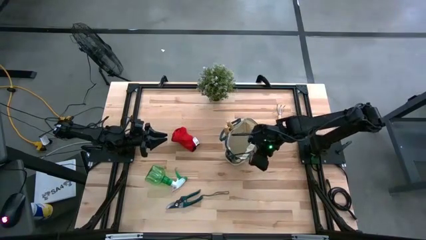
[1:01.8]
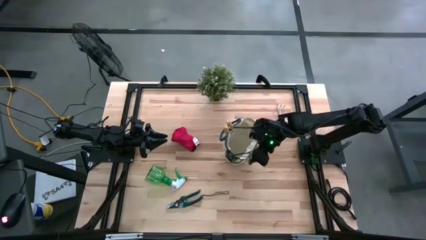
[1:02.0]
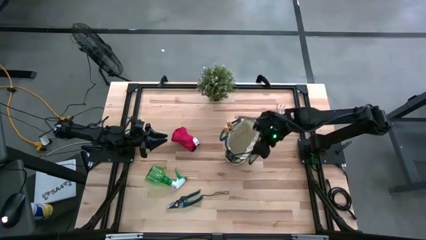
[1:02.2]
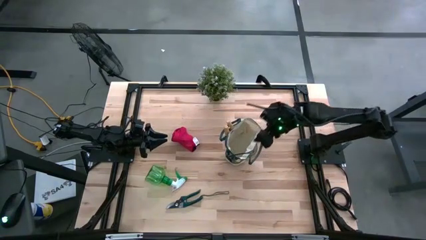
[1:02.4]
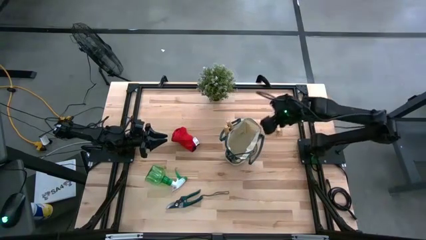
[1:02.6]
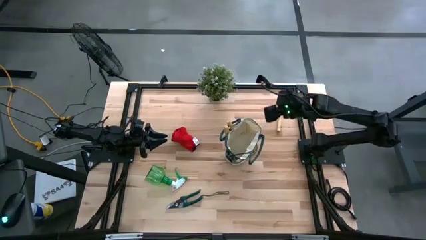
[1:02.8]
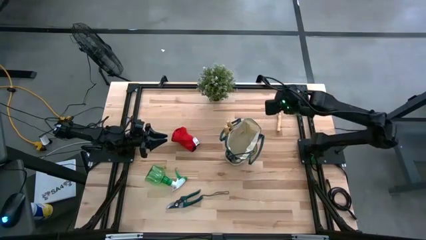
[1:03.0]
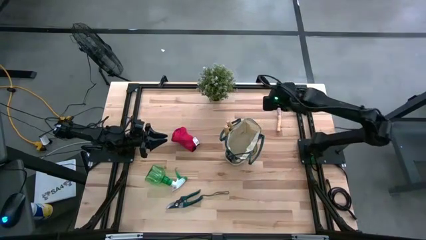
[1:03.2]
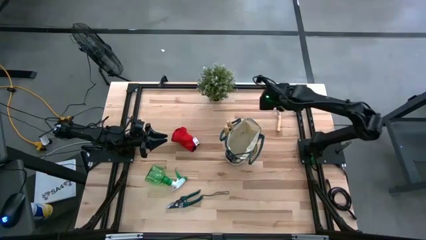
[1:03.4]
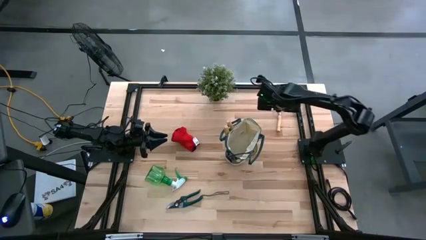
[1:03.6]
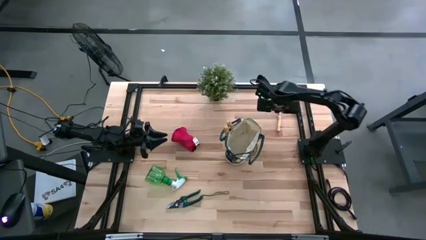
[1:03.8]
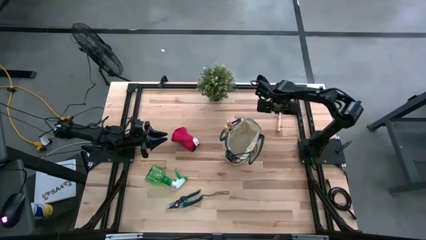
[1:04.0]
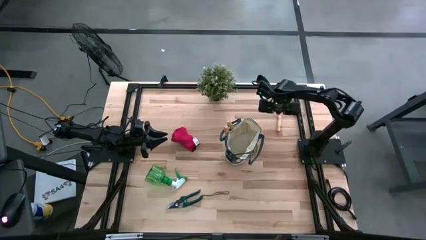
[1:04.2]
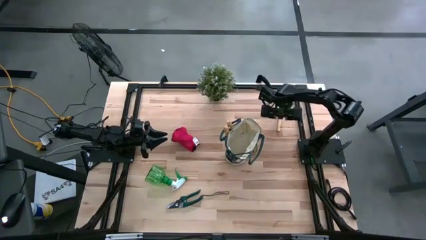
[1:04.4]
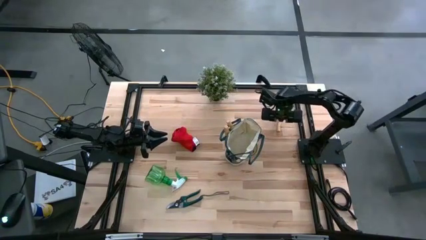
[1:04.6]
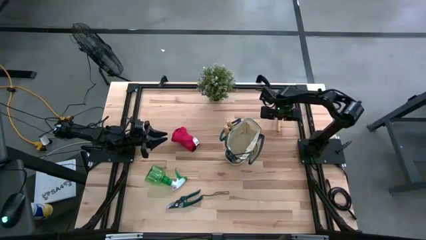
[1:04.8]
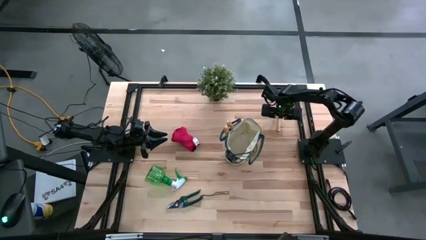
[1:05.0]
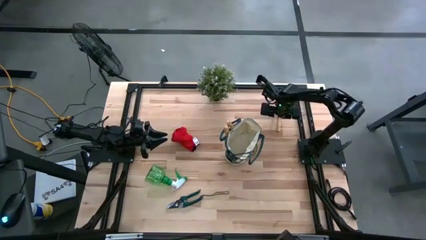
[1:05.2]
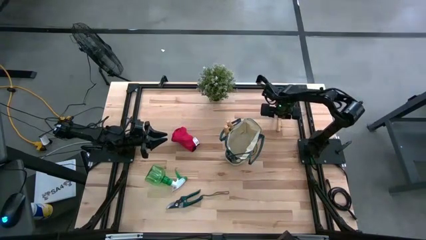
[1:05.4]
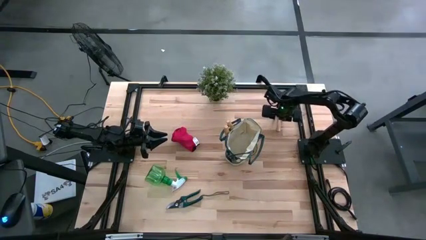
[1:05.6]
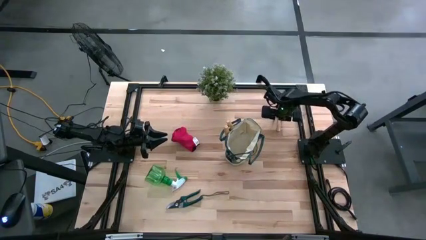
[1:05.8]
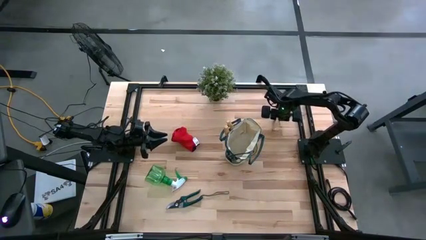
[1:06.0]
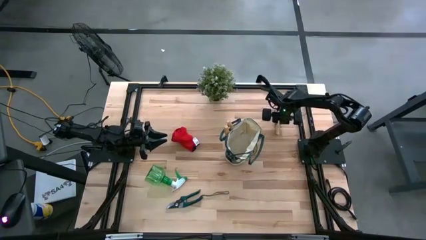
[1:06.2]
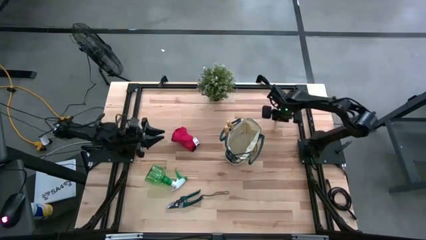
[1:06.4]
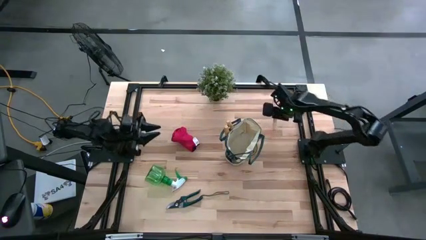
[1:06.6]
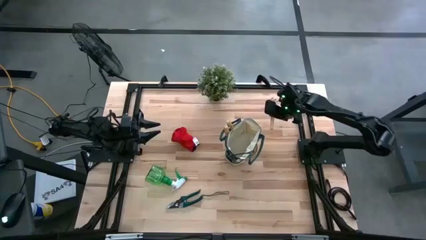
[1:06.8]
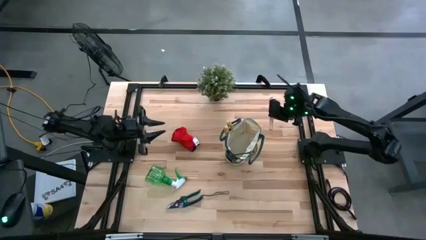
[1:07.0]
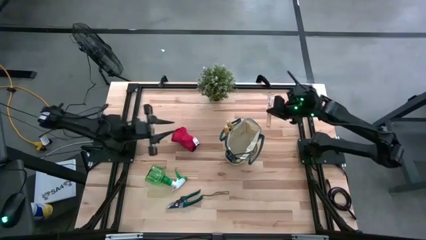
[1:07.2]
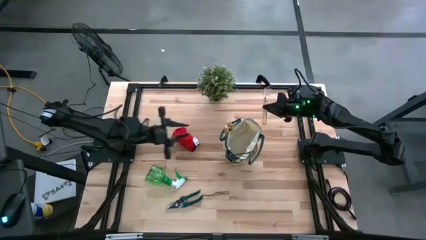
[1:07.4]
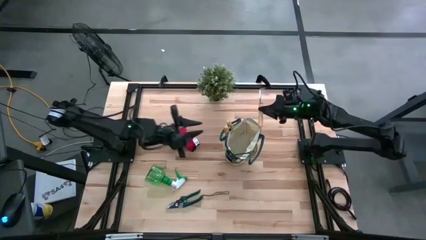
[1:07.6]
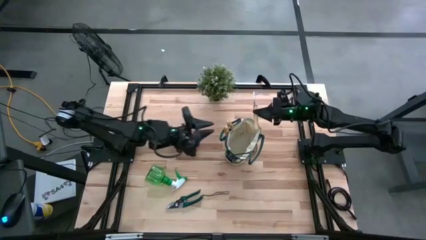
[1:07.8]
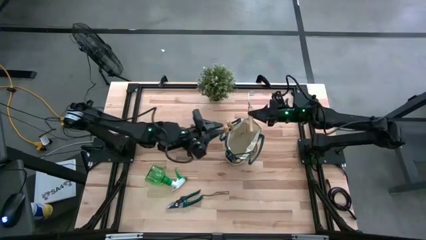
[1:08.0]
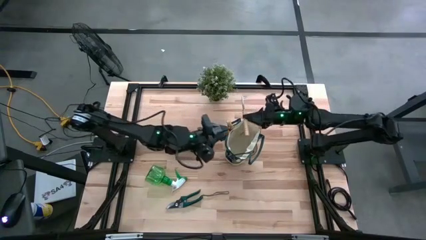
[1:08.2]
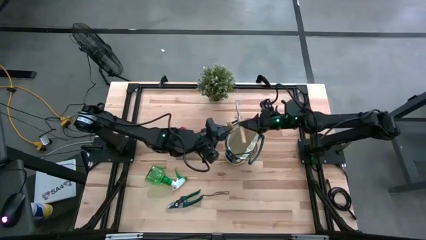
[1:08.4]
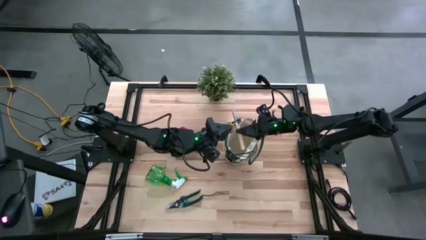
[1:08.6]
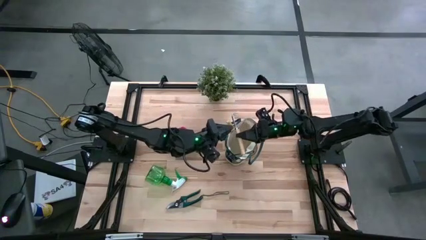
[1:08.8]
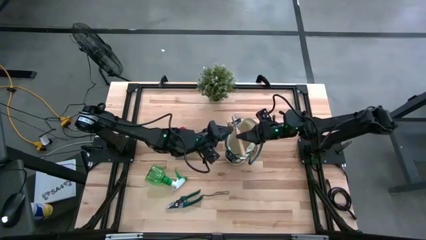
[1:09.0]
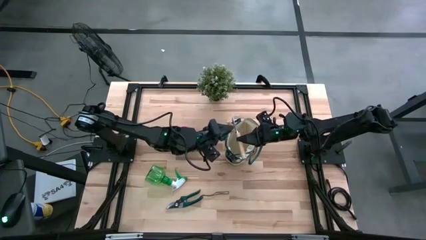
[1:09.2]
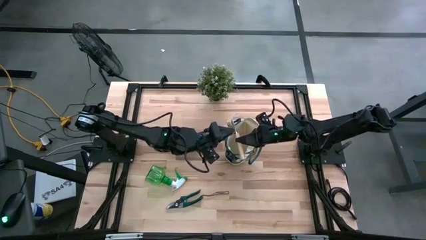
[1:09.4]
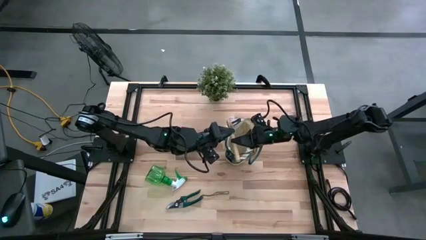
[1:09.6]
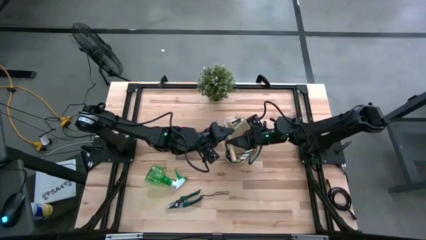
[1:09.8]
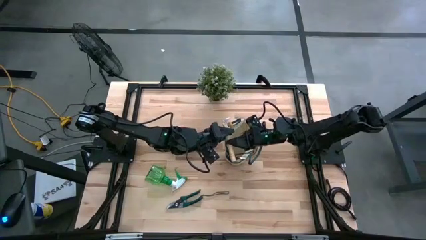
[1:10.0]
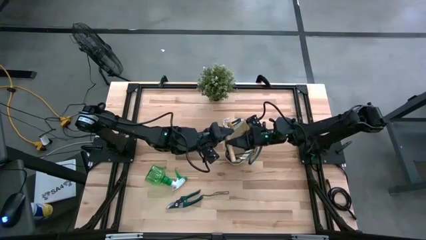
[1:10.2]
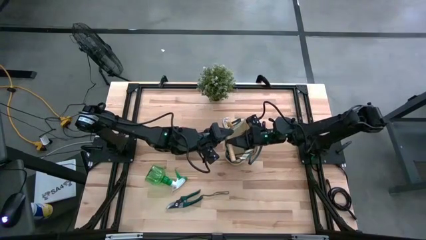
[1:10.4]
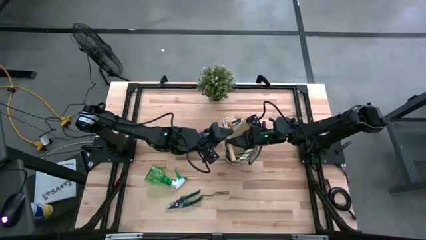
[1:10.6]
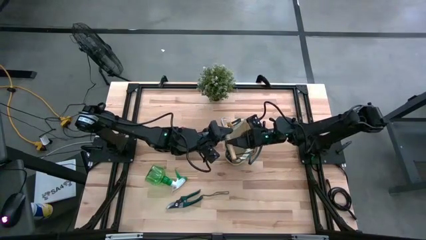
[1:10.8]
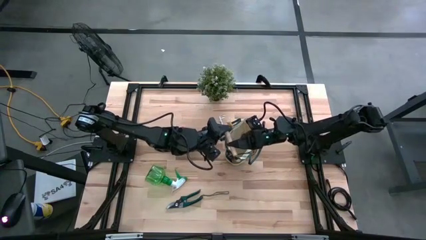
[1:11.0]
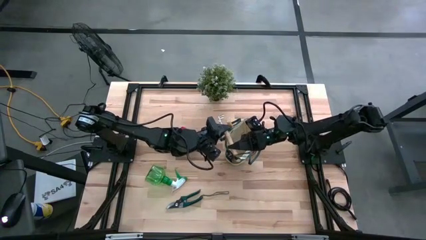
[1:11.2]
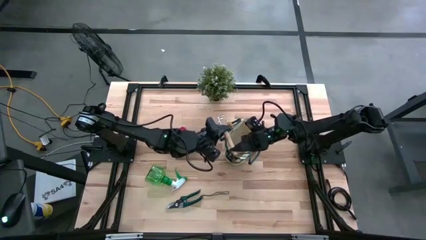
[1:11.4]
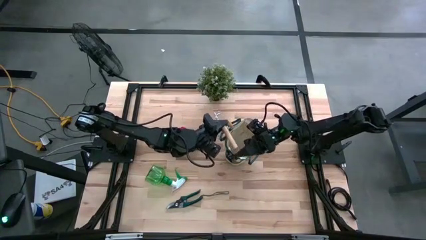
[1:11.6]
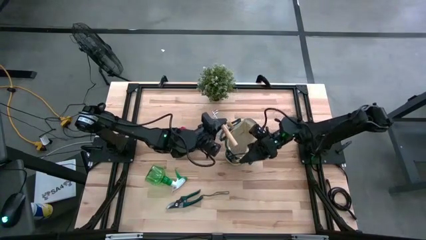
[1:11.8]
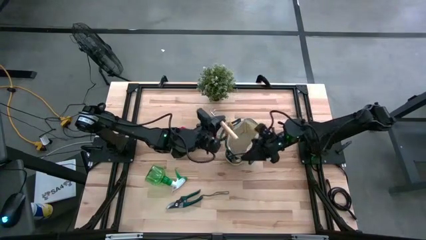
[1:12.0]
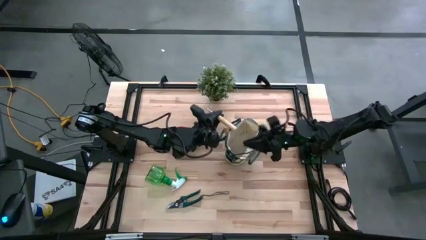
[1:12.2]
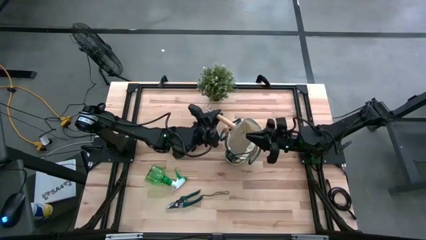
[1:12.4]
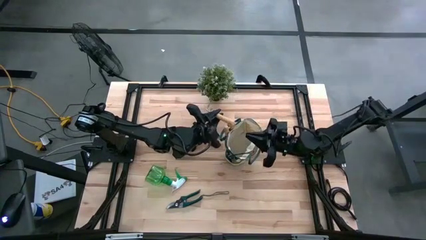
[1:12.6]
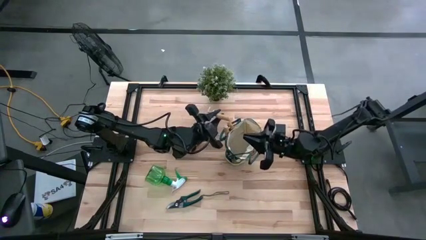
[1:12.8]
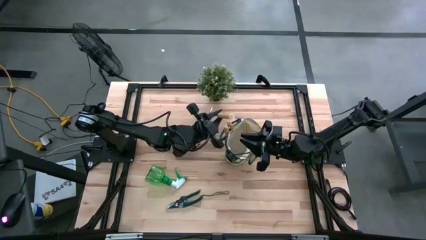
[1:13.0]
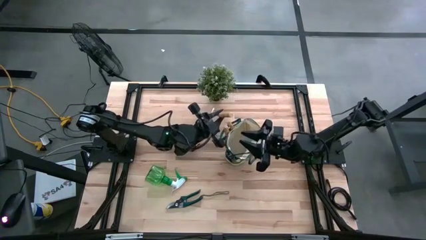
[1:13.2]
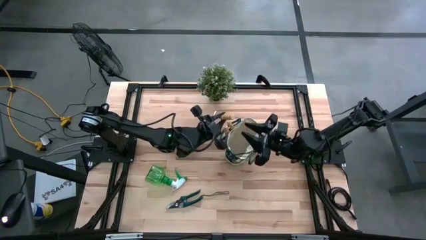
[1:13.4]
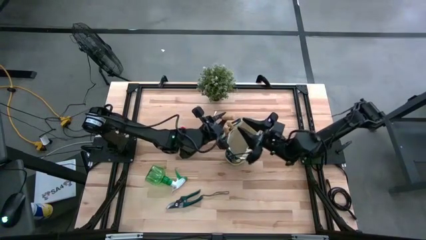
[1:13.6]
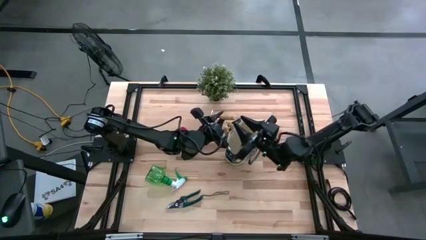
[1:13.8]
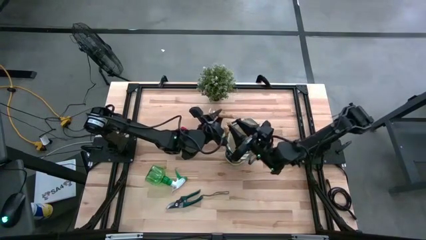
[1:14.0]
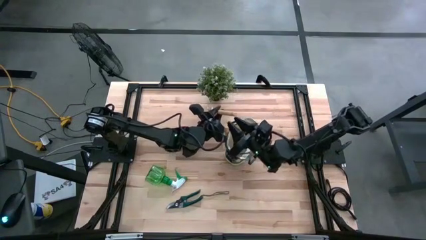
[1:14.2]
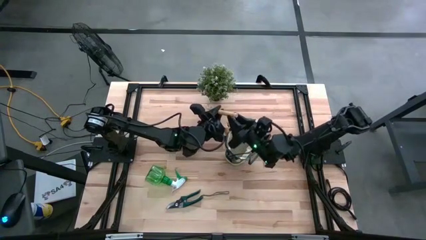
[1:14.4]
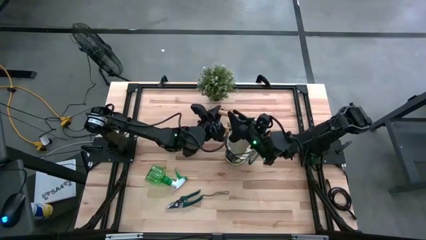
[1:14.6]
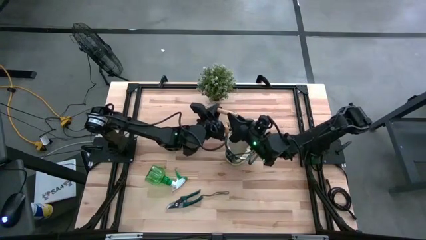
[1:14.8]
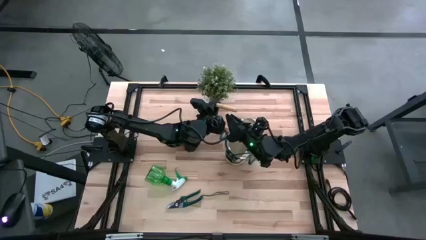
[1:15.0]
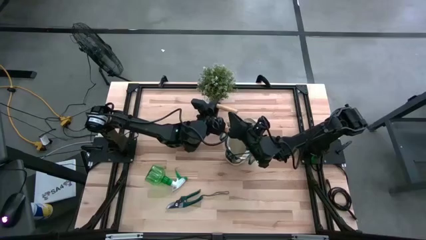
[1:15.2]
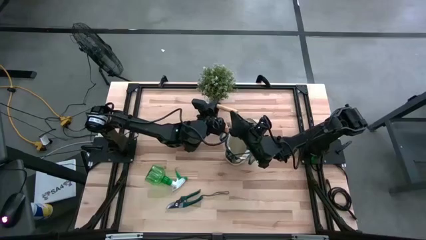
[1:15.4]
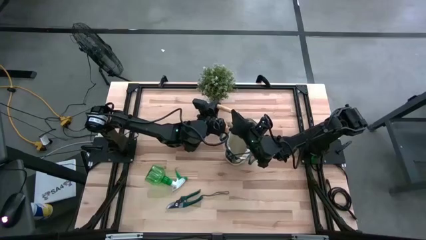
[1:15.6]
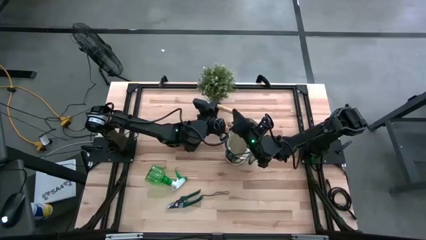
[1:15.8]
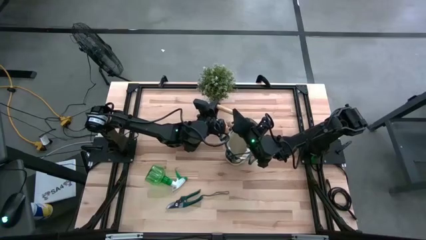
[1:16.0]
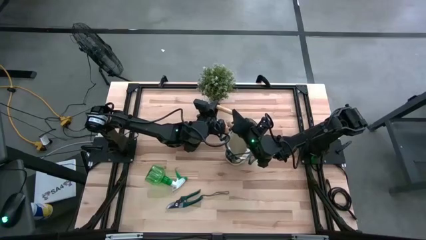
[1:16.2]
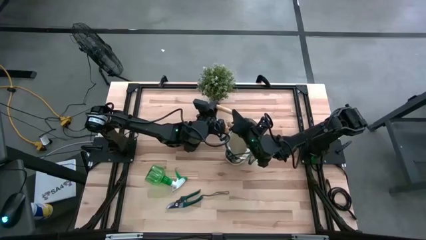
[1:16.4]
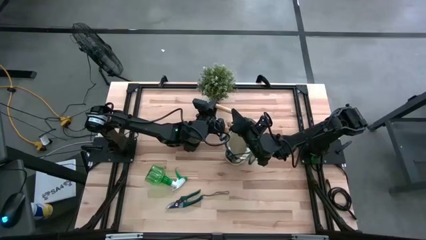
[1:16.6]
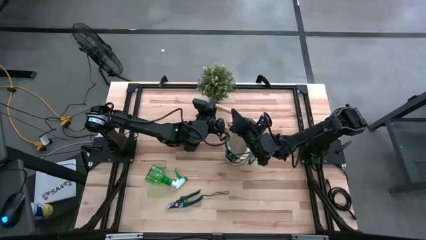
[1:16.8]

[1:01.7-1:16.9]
Task: Pick & Place Garden tools in Gardening bag
Put the hand rake into the gardening bag

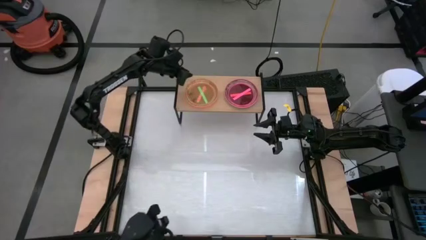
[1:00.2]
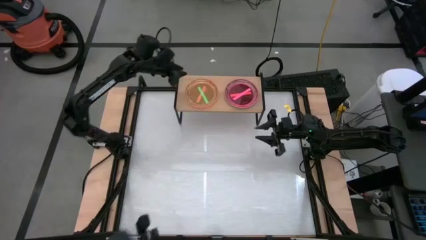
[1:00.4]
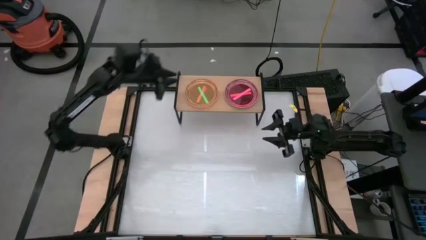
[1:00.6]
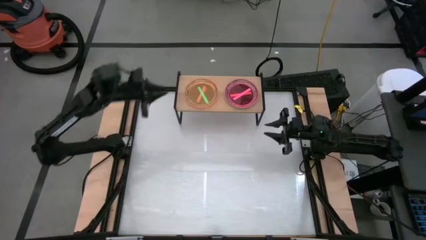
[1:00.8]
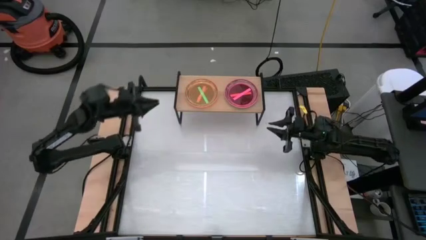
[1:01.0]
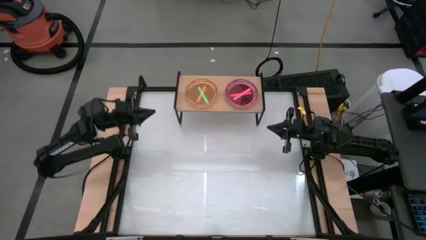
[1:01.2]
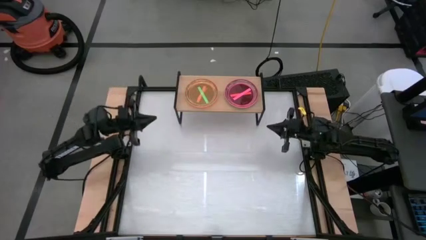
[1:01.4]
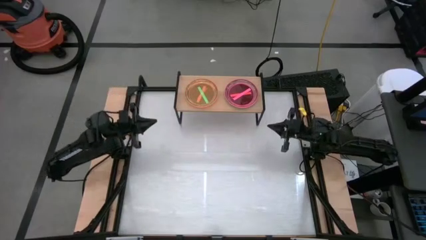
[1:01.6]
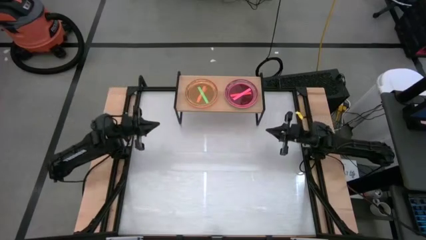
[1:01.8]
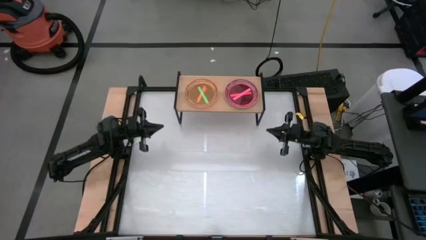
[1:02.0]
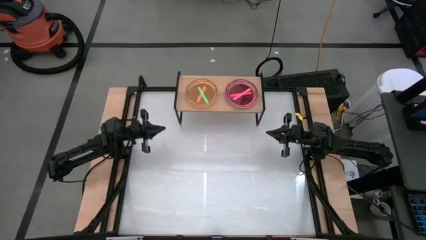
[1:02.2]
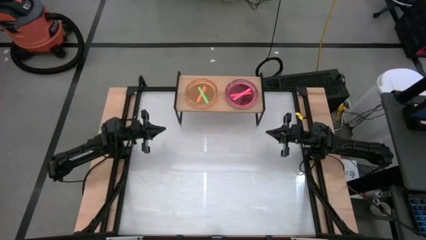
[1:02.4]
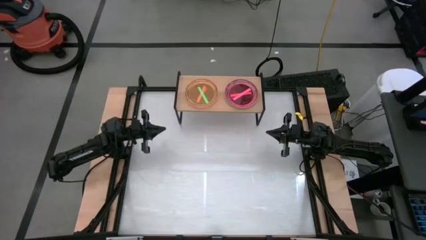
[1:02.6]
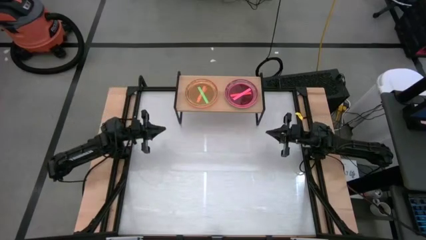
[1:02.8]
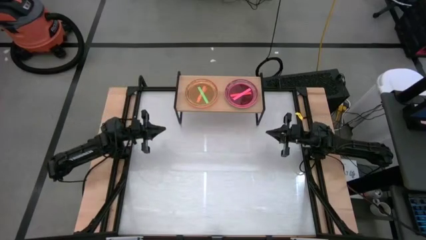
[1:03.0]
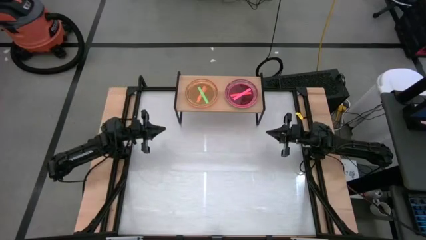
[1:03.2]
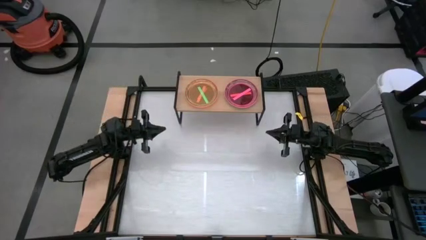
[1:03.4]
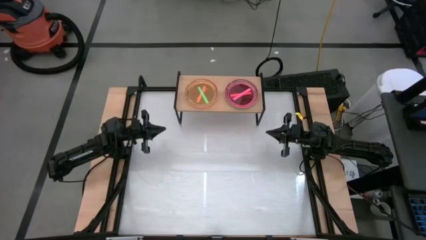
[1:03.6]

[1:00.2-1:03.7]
Task: Place and stack plates onto a shelf
Return to Home Position
